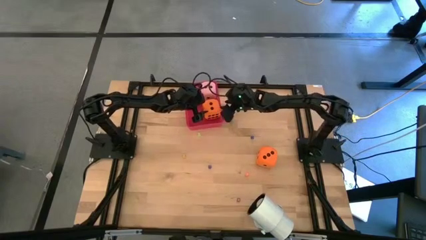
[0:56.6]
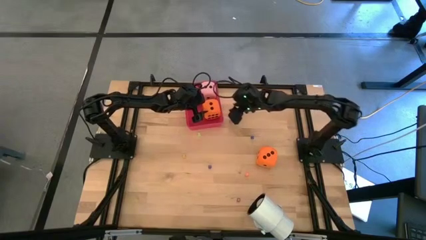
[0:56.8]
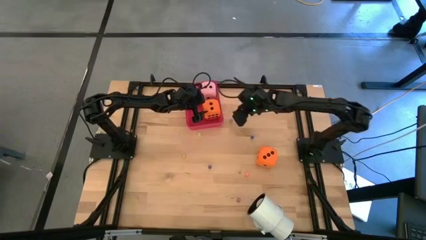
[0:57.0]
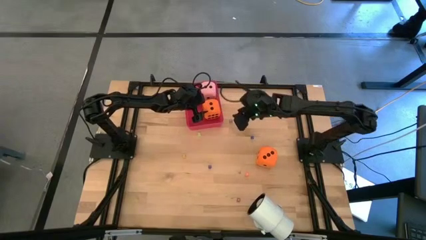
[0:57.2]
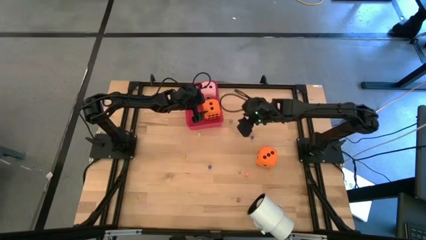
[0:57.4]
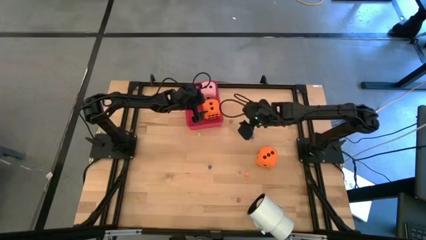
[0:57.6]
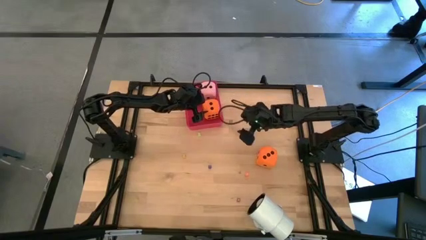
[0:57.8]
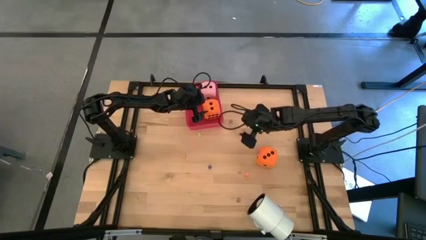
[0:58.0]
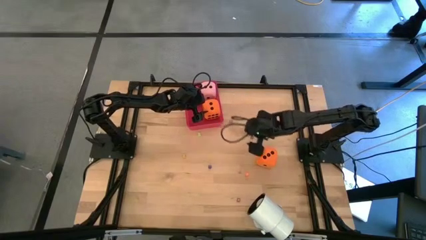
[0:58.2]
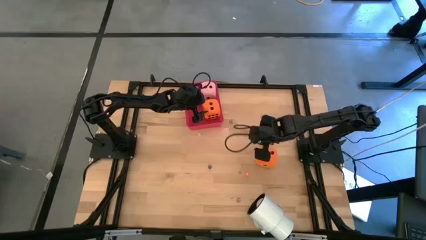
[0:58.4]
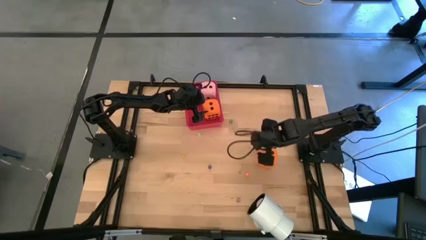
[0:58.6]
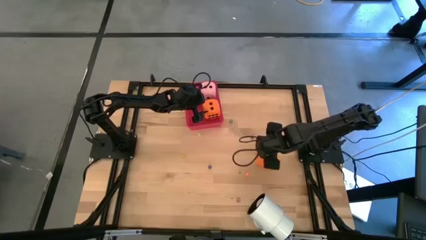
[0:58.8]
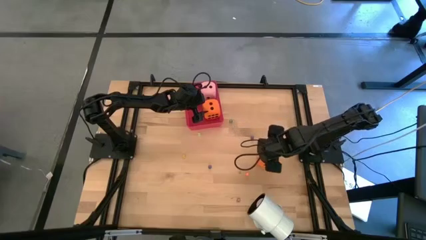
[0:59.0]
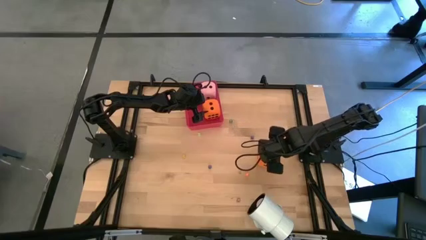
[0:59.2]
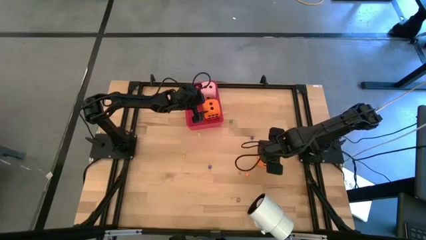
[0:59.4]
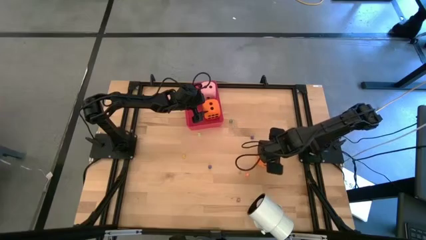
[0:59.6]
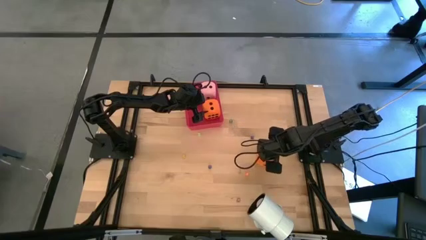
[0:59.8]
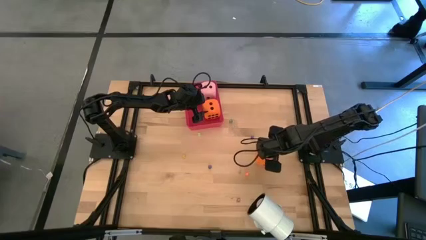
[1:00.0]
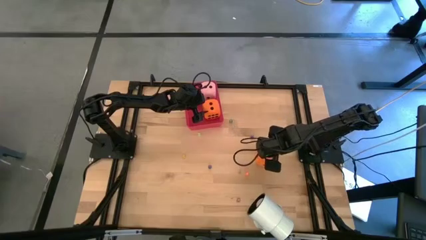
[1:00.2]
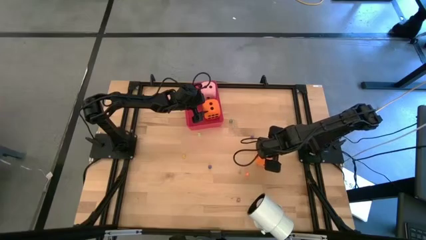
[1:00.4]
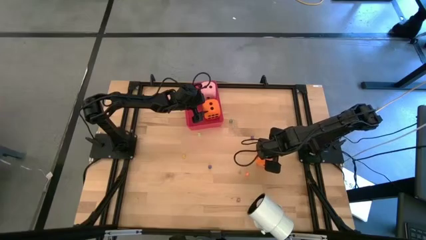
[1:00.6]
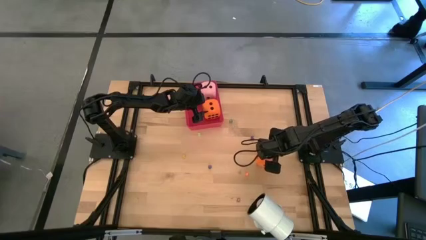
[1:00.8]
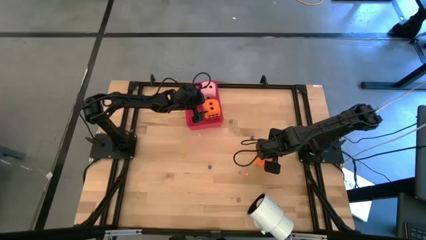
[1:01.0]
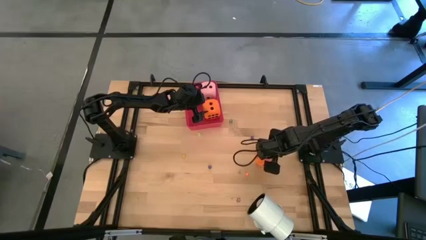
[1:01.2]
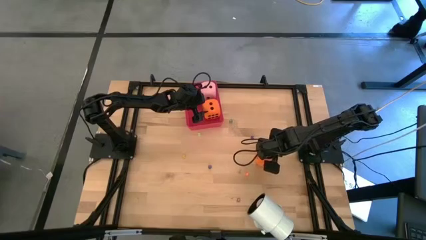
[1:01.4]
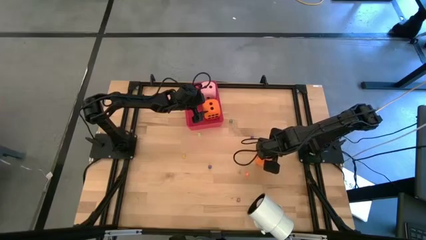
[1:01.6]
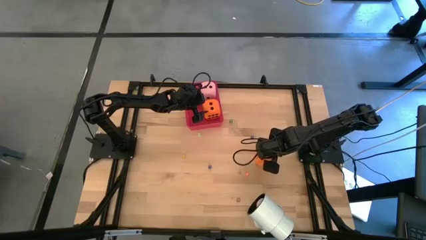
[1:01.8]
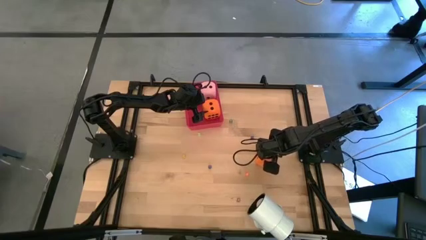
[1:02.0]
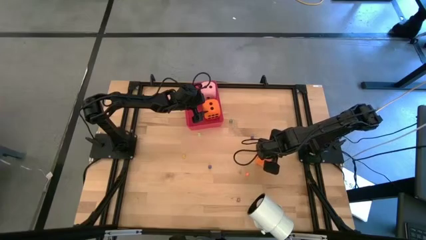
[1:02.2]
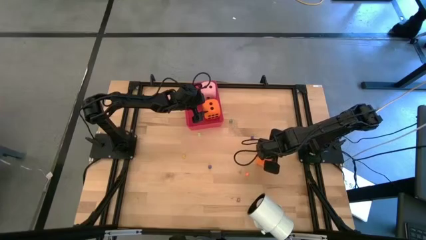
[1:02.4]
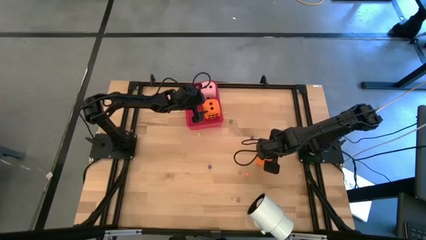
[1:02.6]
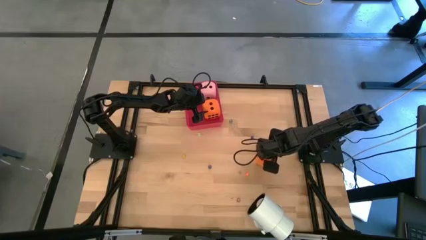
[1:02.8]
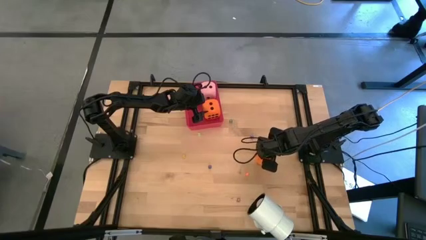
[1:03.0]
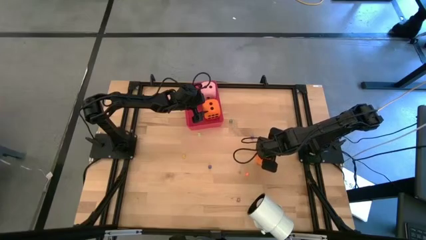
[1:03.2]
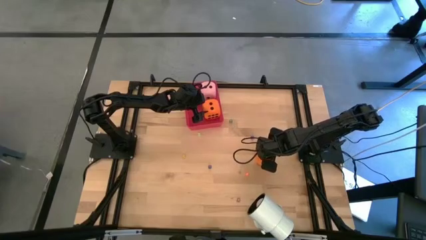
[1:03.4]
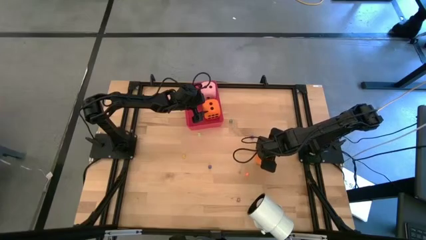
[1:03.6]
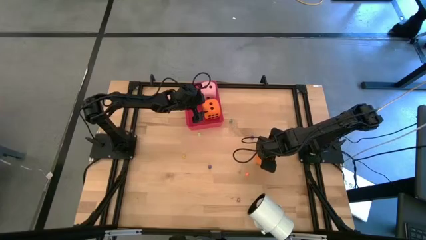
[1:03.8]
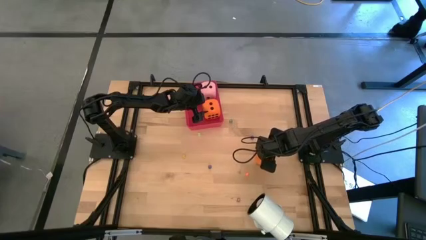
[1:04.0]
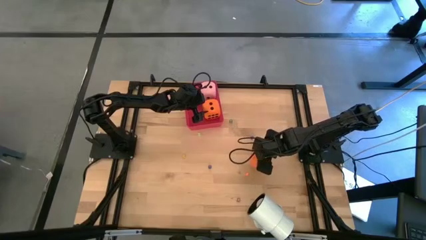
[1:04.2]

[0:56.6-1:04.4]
Task: Pick & Place Dice
Put the big orange dice into the red bin

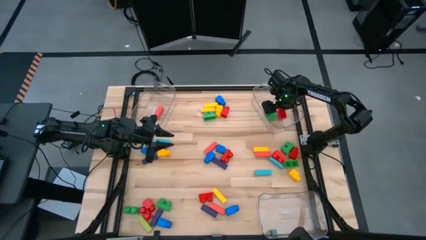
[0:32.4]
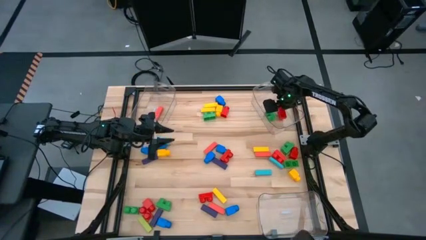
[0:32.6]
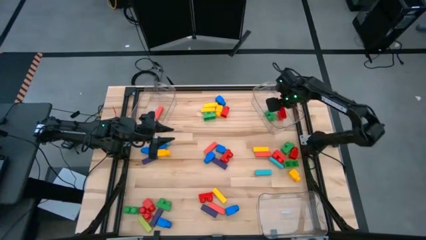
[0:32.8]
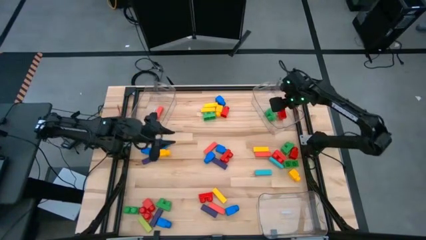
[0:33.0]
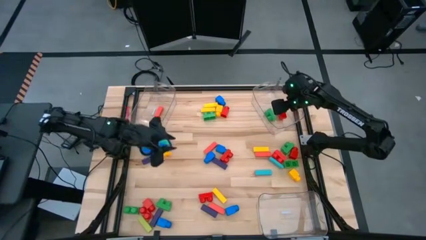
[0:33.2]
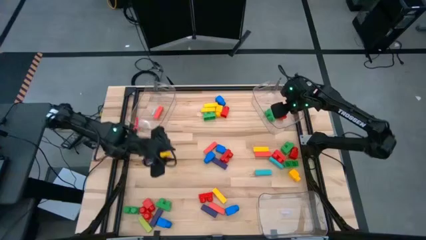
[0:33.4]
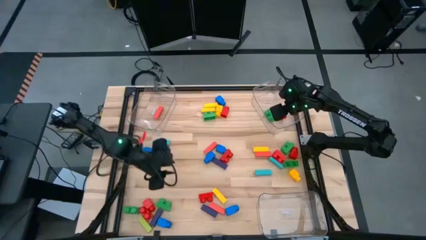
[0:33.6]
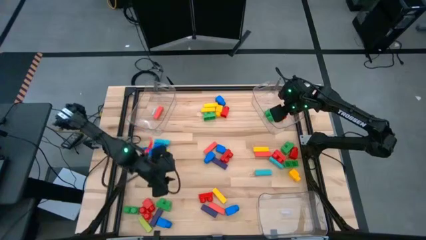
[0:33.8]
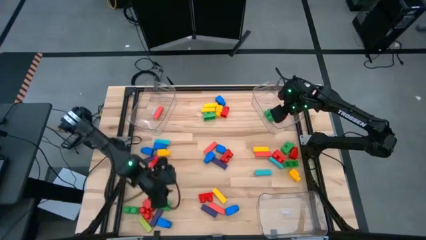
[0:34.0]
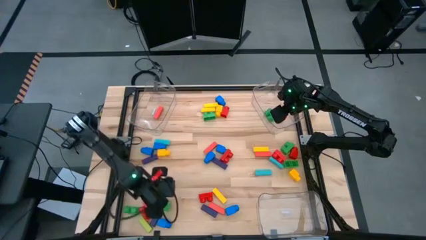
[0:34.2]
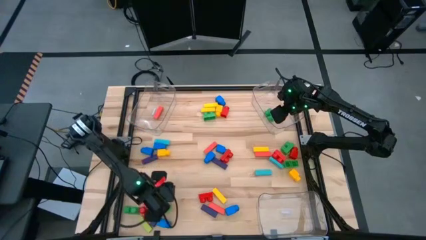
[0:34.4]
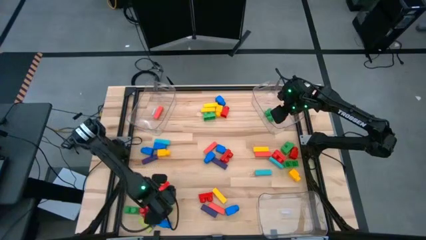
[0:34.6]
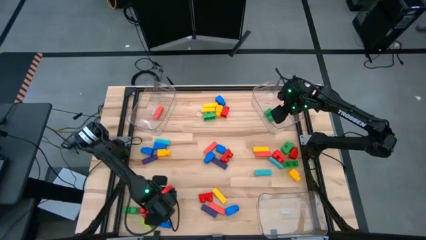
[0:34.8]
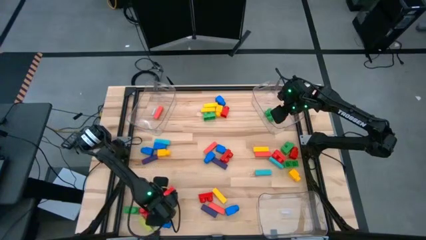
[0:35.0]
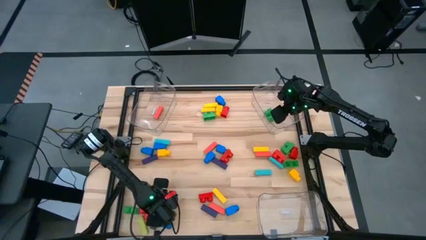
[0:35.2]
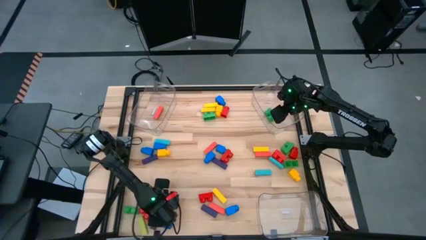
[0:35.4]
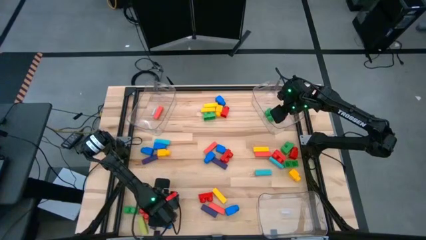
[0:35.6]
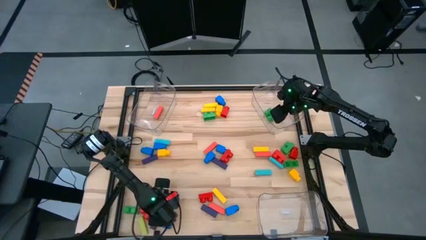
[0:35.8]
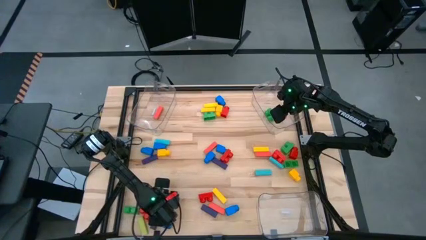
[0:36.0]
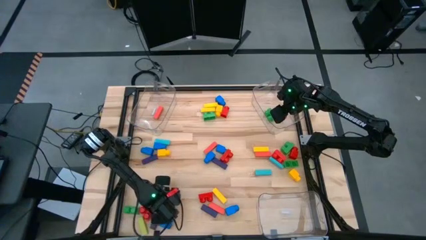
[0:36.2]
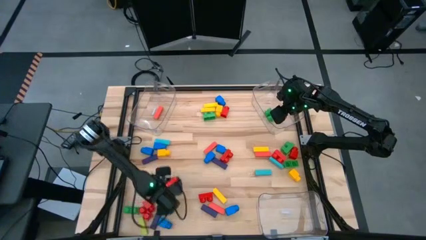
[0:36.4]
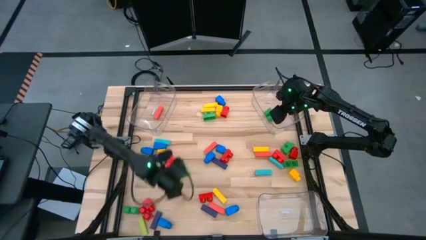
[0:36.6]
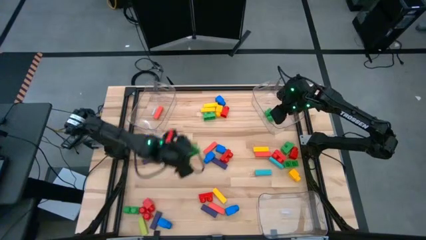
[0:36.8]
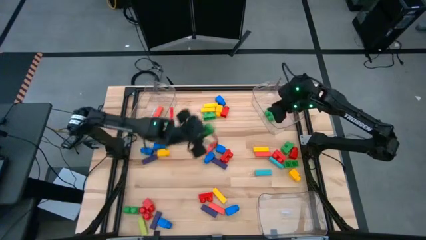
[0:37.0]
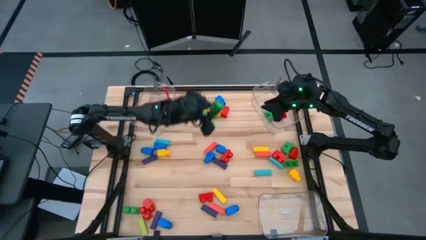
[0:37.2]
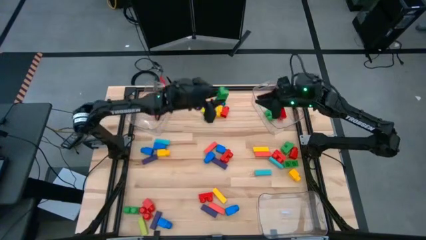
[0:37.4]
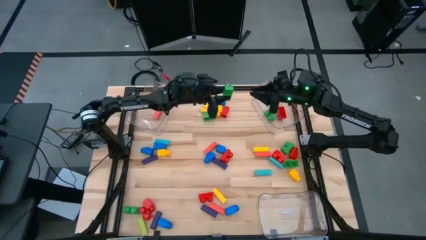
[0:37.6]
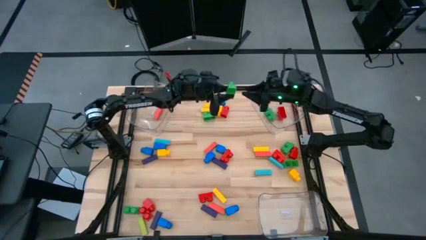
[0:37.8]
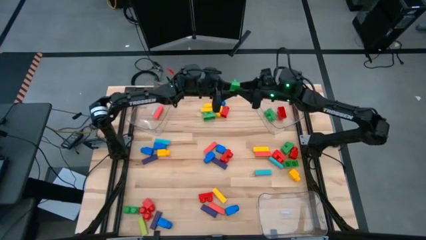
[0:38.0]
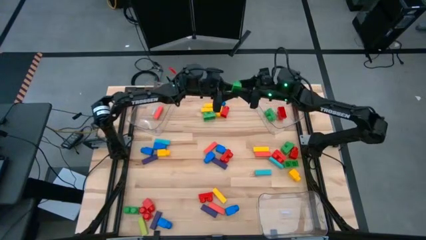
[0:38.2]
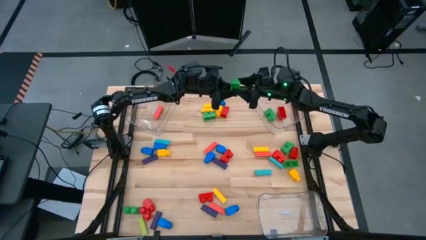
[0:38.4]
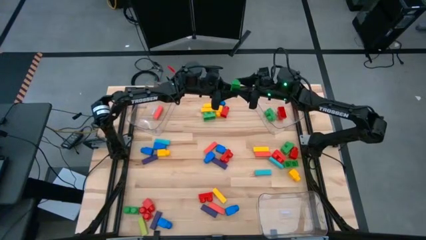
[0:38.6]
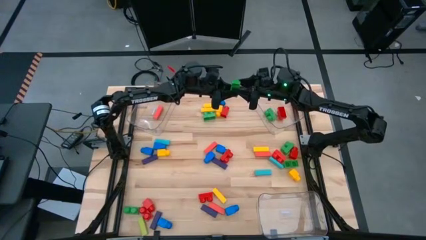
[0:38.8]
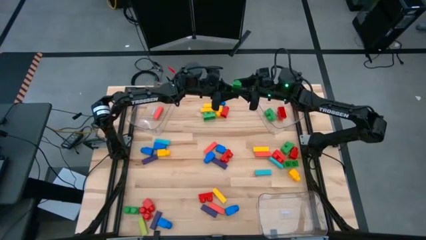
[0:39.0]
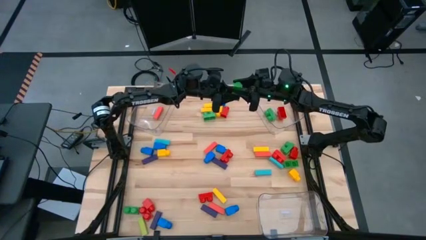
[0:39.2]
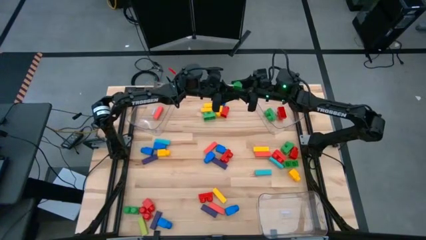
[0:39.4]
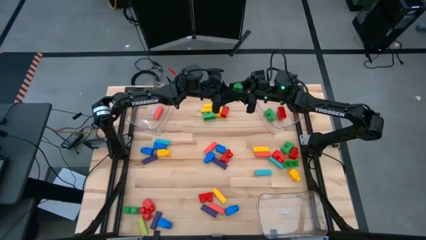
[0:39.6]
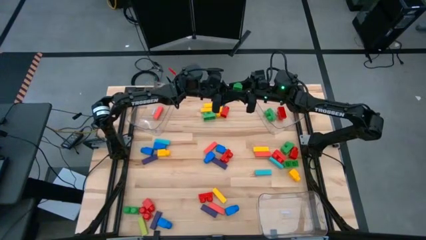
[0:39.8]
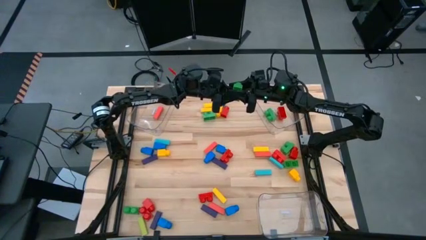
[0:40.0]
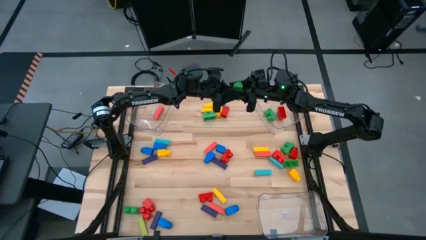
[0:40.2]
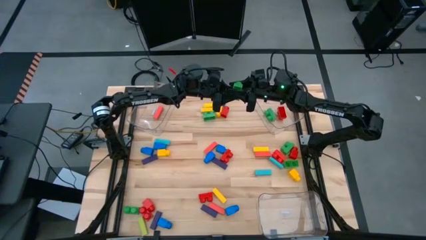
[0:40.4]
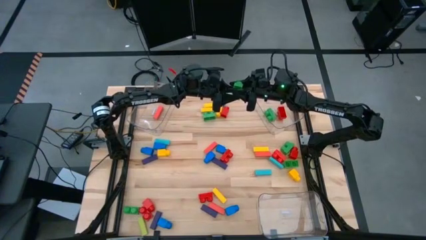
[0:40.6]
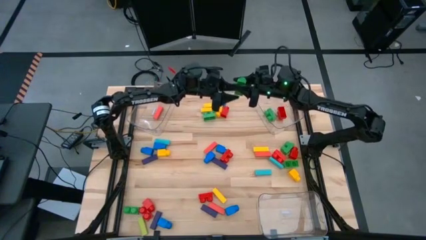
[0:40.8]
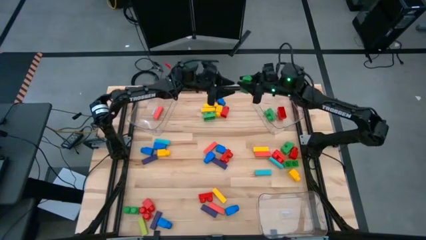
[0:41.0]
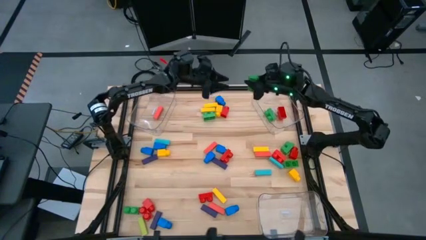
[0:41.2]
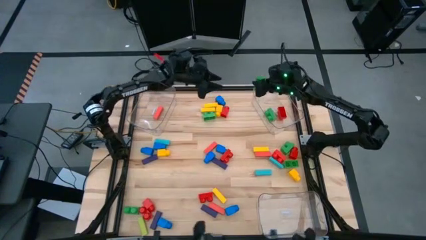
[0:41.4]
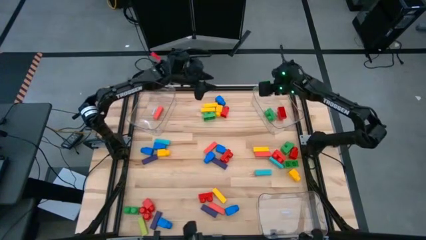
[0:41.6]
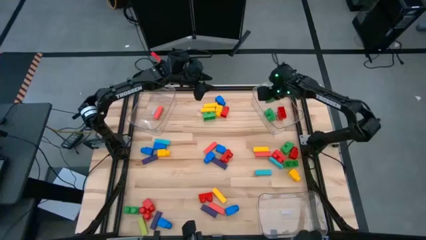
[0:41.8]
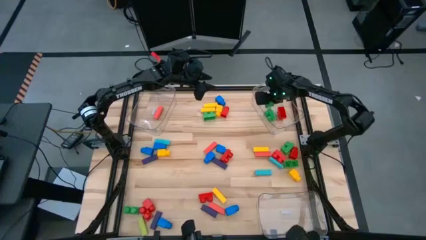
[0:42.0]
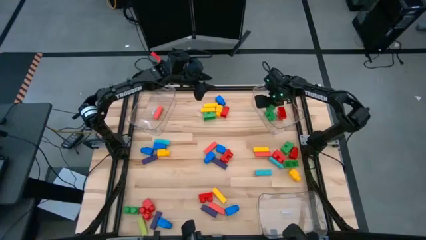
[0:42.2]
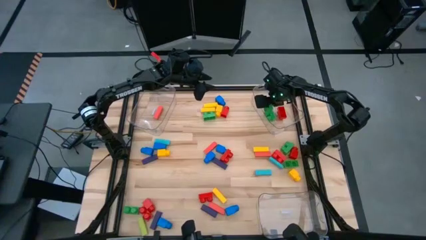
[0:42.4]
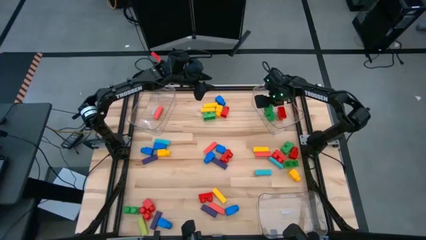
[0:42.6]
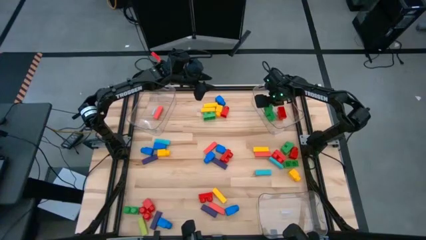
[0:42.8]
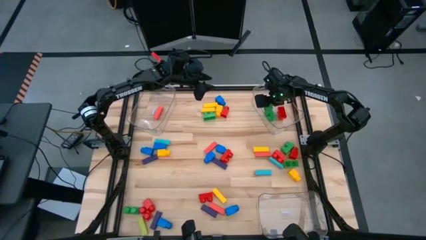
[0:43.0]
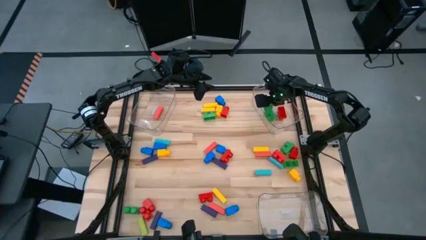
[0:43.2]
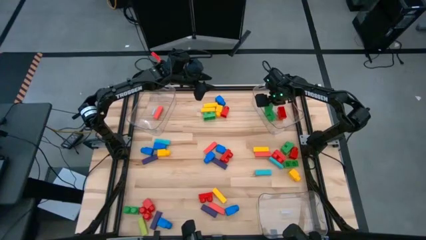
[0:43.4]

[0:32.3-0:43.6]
Task: Sort blocks by size
Put the green 2 stud game piece into the top right transparent bin
